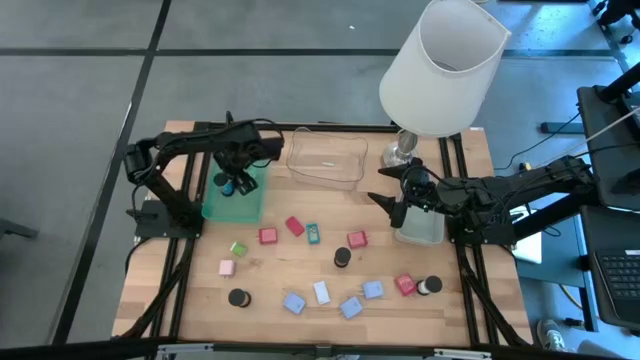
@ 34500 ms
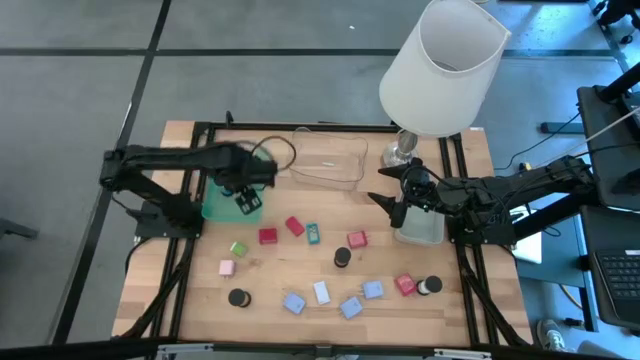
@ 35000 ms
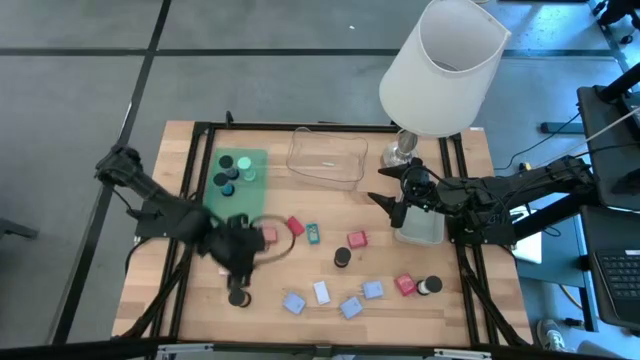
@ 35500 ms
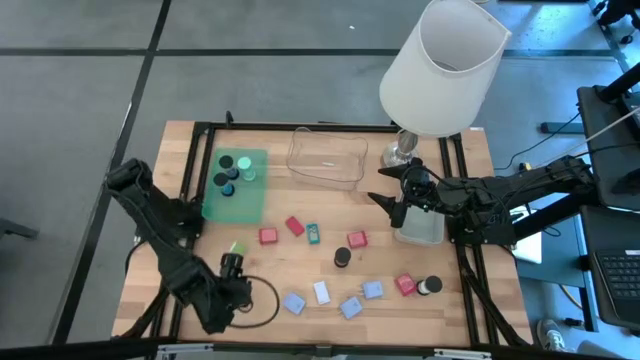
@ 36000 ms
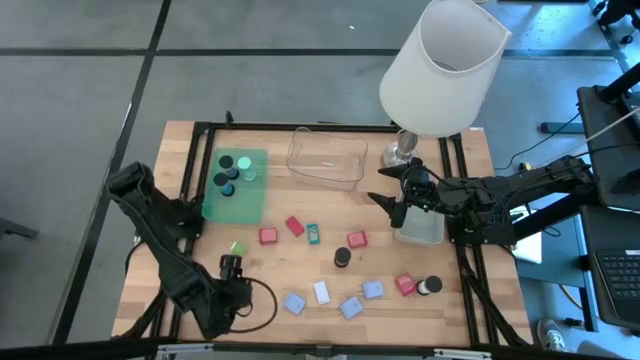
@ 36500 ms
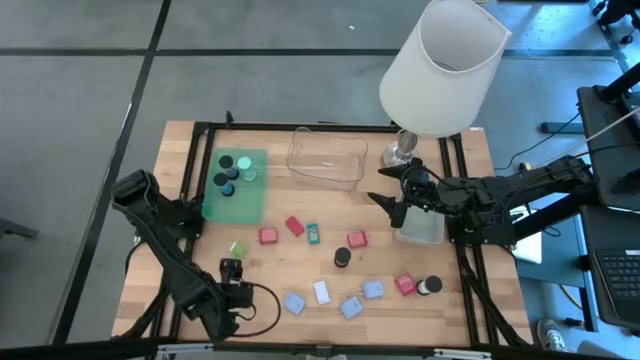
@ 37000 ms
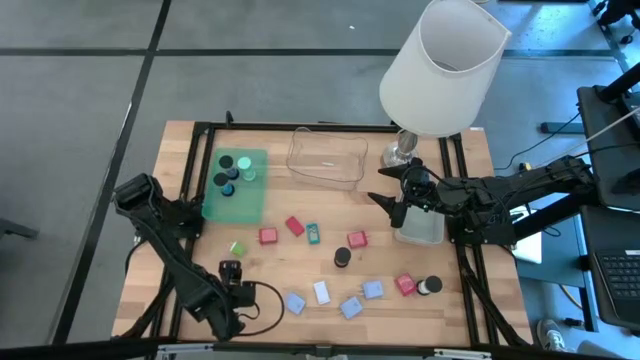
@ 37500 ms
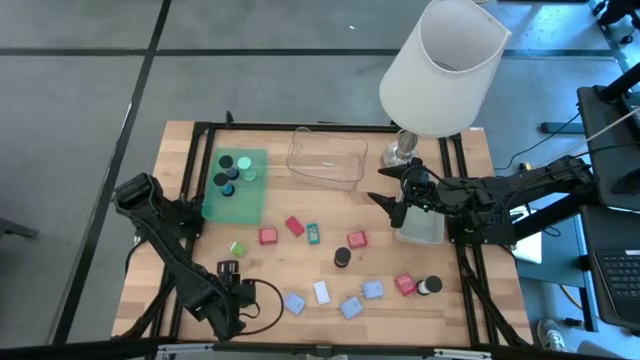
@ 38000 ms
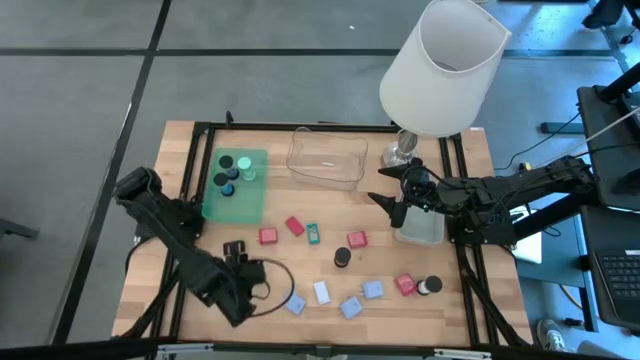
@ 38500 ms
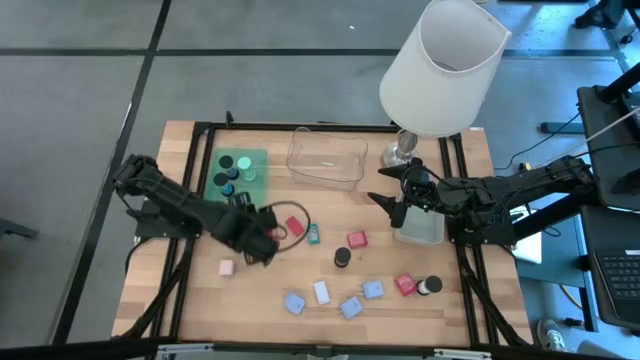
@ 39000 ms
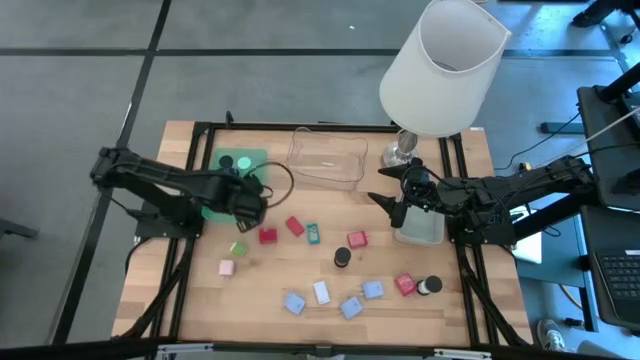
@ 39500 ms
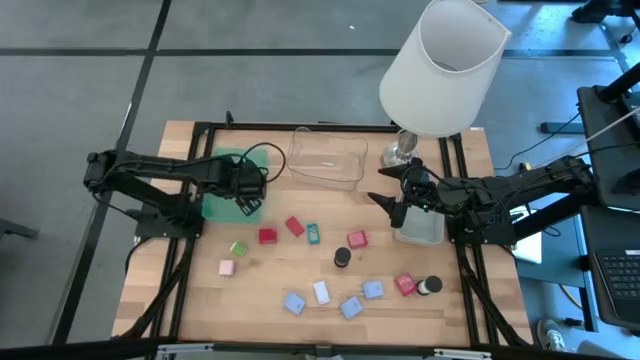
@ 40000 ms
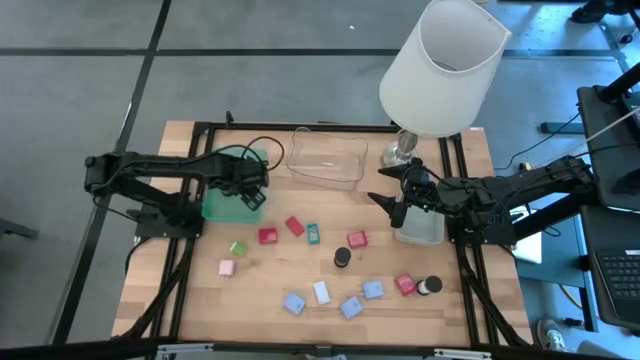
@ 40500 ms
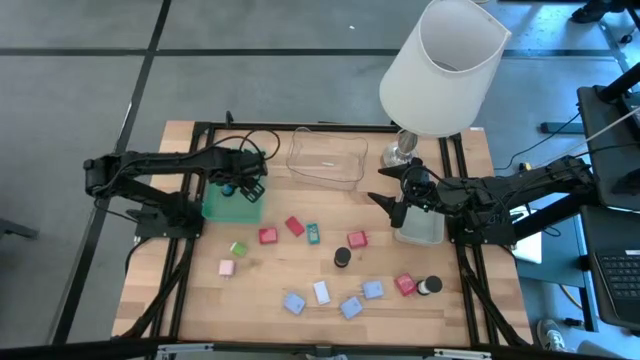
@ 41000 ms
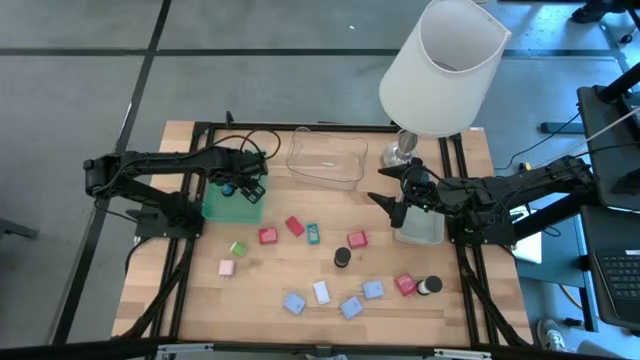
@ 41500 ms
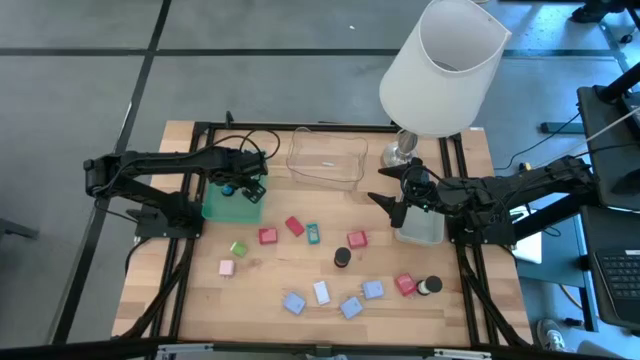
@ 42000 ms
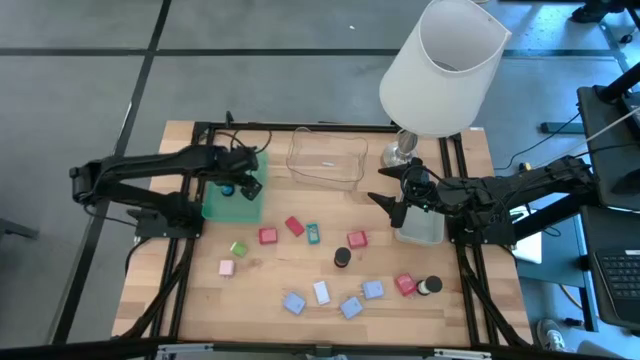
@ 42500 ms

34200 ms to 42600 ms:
Task: Pick & Place Office items
Put the orange hourglass into the green bin

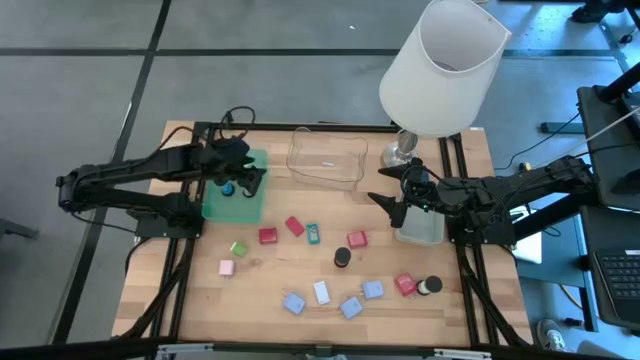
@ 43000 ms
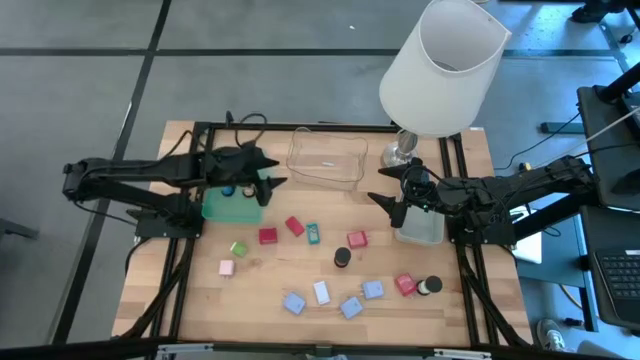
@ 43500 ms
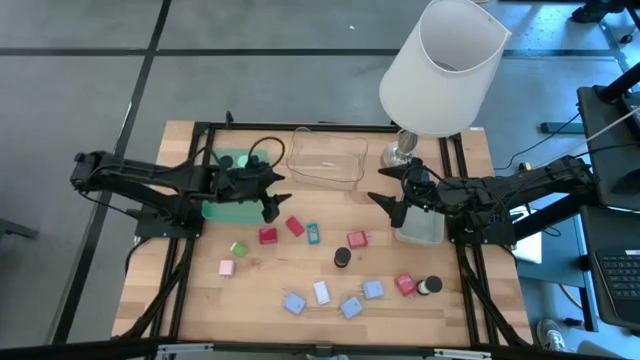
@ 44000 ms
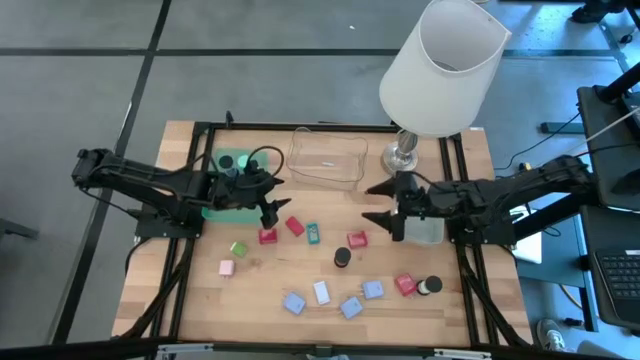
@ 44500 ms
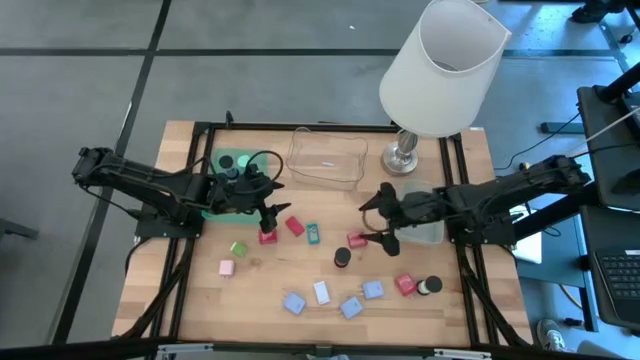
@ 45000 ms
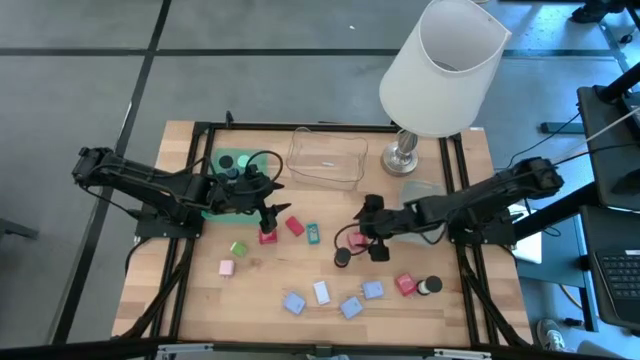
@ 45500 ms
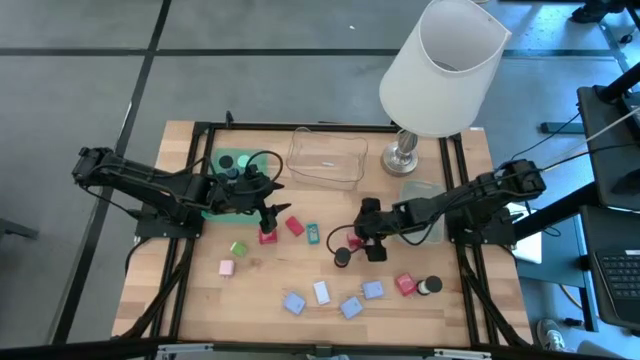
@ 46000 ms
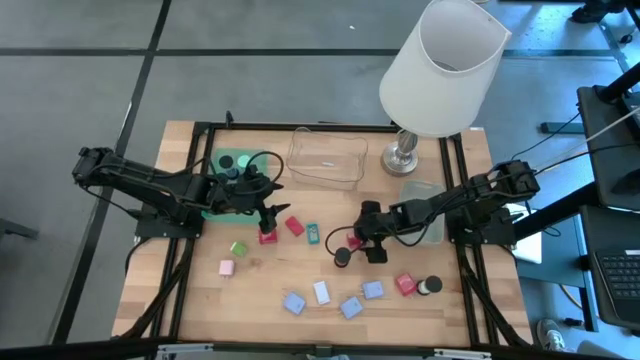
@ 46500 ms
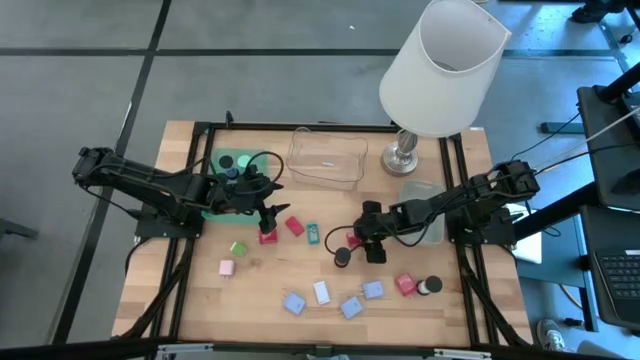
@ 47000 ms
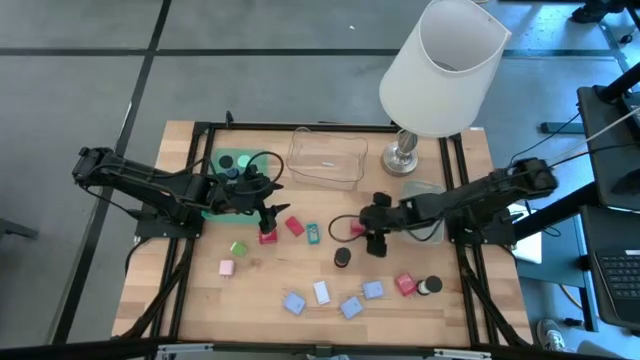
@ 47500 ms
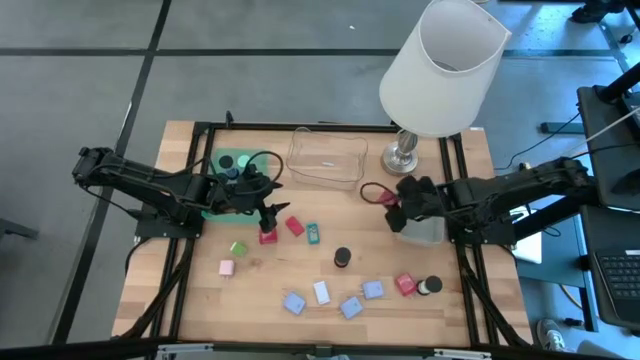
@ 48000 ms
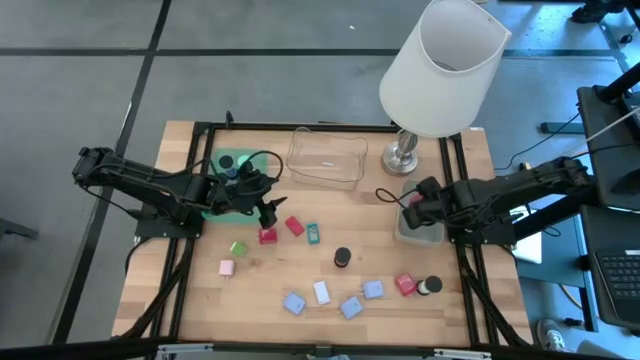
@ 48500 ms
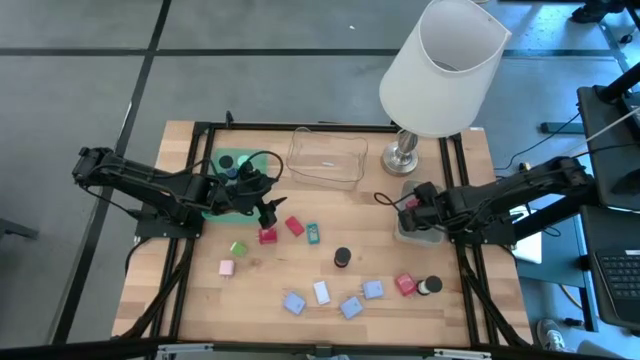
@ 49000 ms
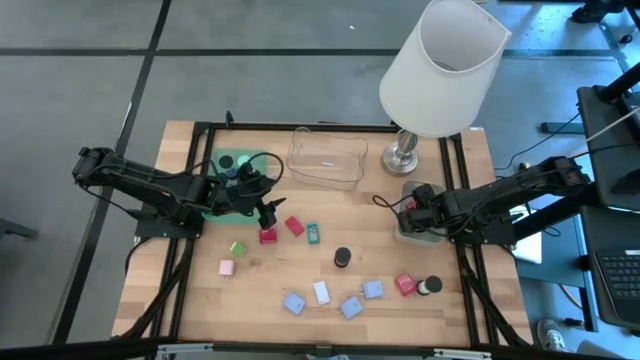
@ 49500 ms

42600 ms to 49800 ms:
Put the top right red charger adapter into the gray bin

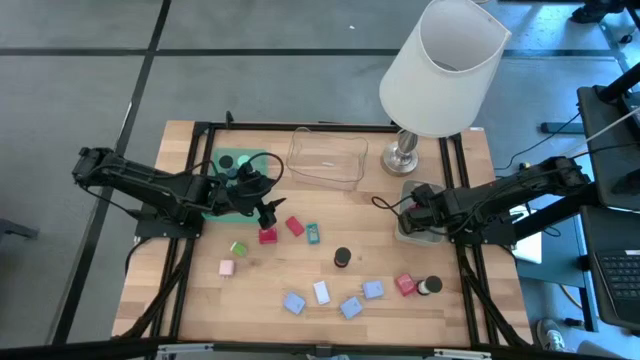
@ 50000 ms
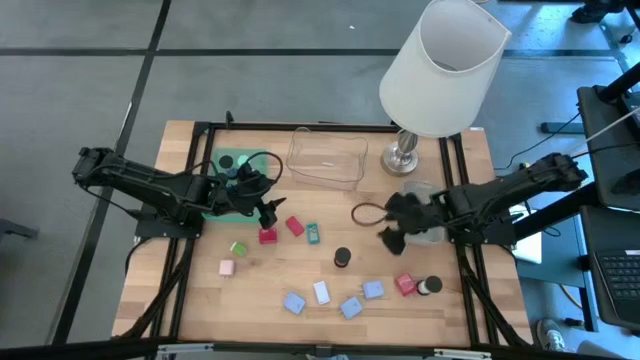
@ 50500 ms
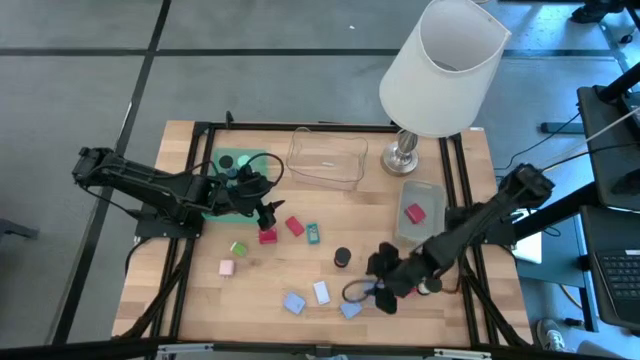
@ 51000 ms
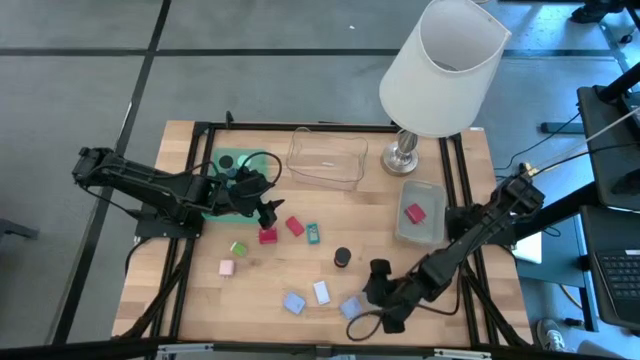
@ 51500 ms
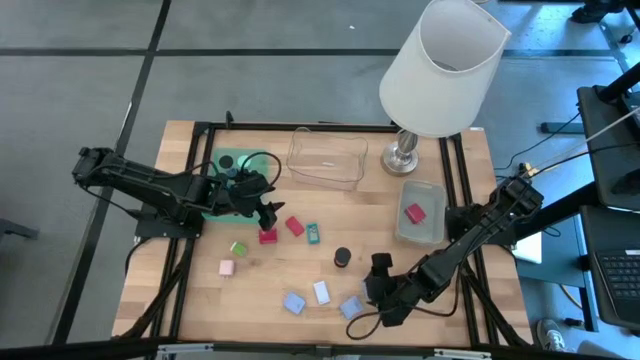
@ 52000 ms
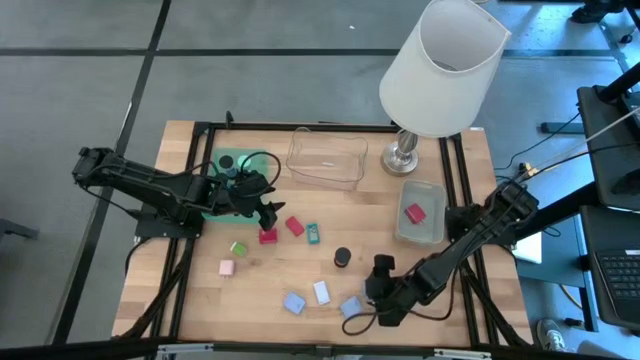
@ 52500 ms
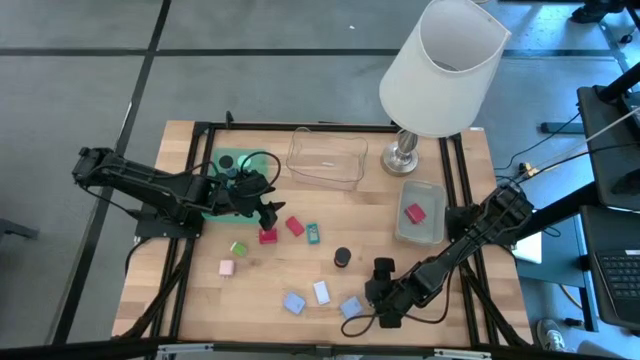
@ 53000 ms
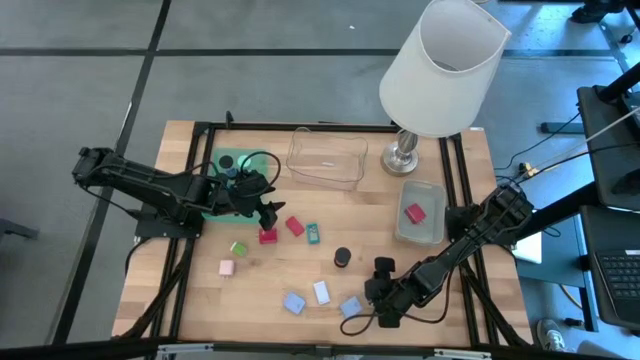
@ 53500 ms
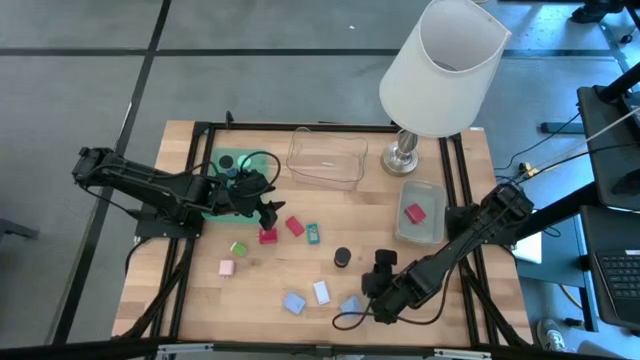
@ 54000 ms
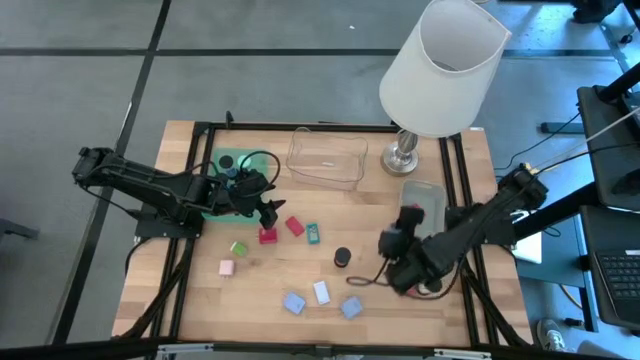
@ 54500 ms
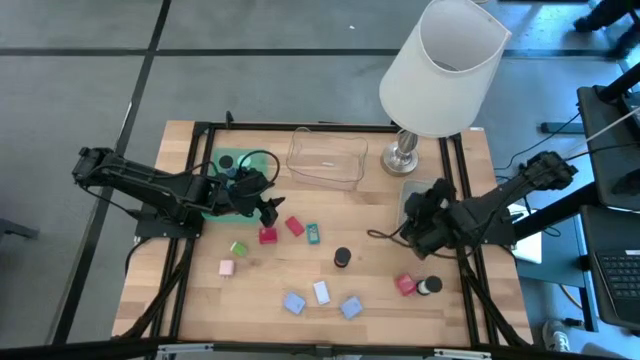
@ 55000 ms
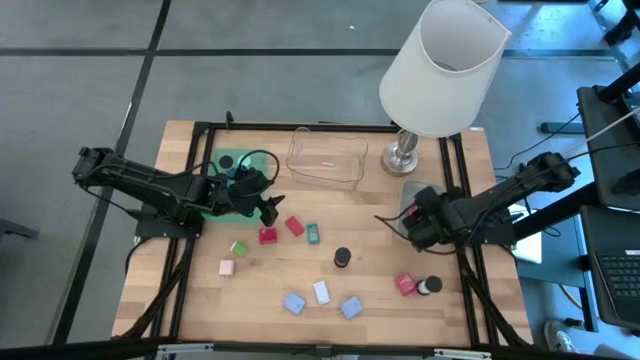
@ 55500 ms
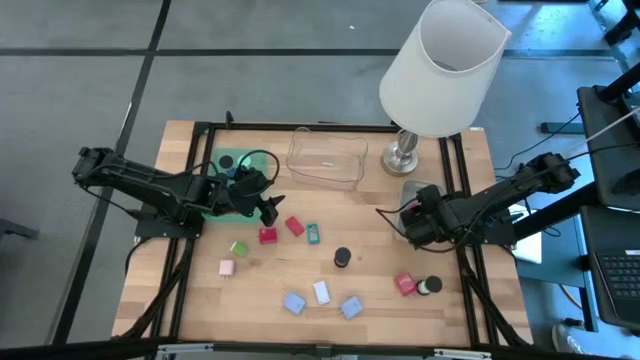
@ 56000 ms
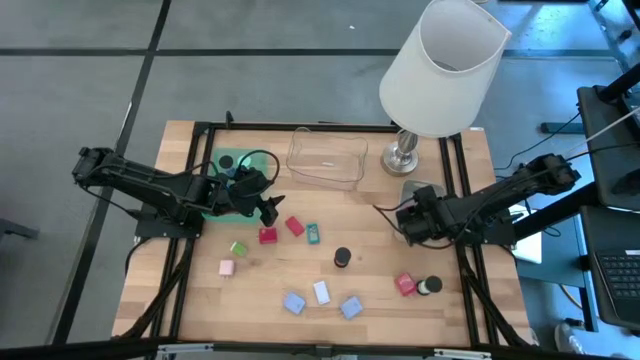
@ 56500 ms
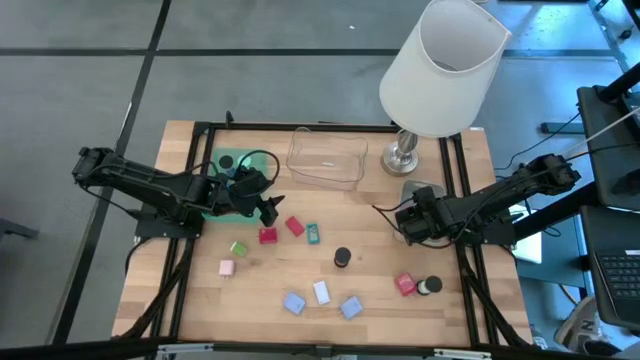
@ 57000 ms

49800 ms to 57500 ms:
Put the right blue charger adapter into the gray bin
